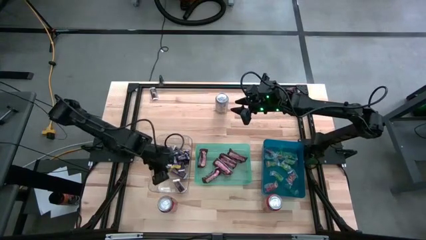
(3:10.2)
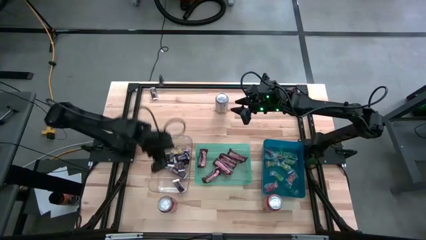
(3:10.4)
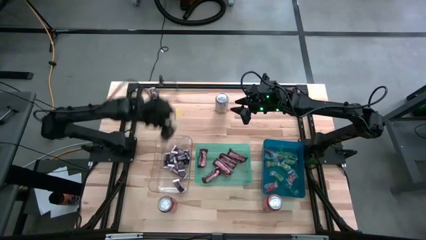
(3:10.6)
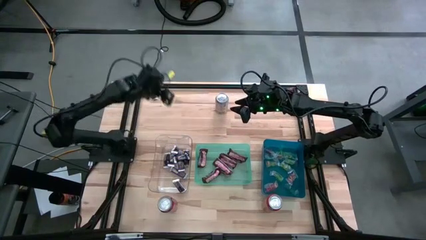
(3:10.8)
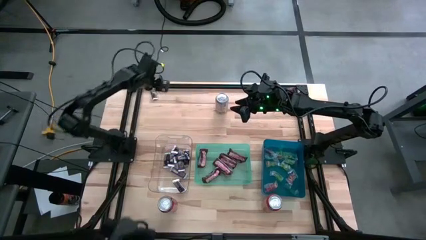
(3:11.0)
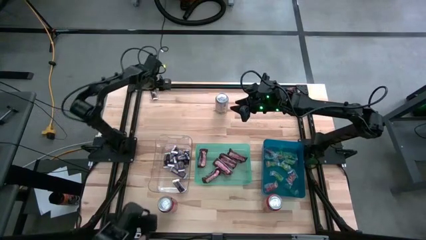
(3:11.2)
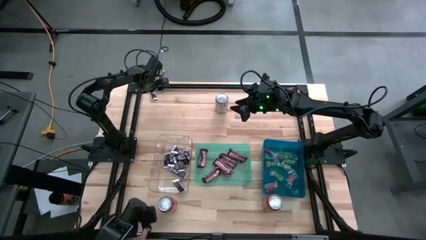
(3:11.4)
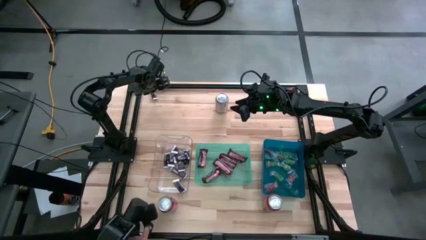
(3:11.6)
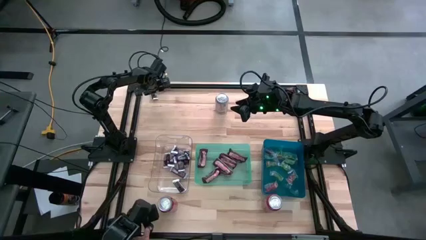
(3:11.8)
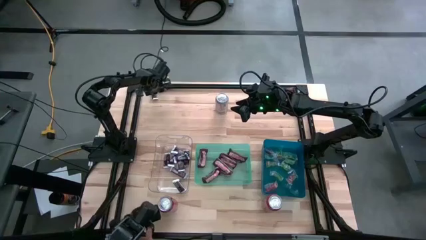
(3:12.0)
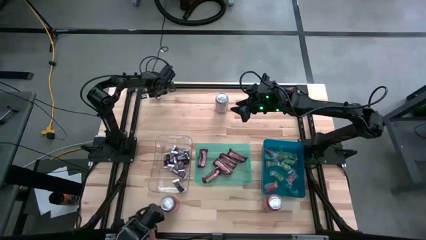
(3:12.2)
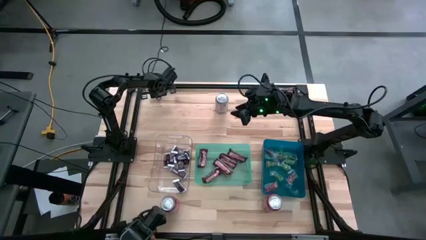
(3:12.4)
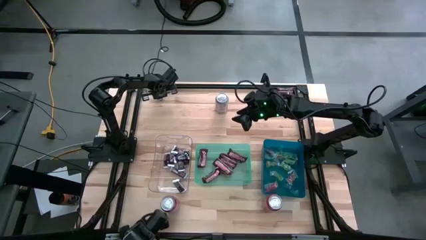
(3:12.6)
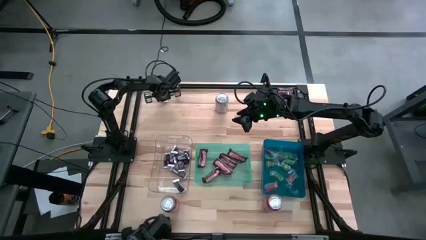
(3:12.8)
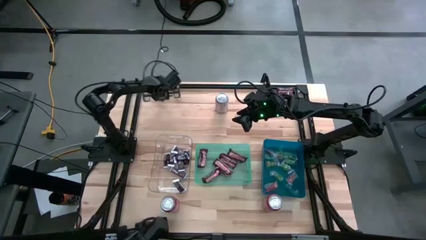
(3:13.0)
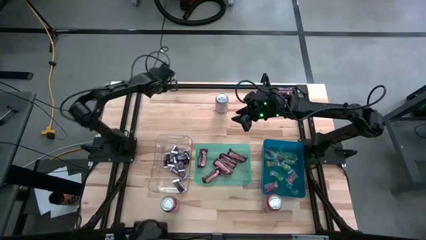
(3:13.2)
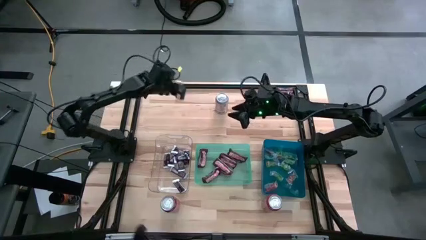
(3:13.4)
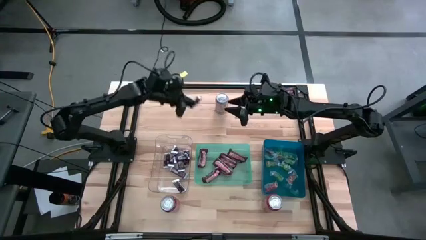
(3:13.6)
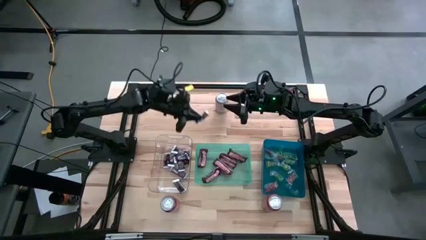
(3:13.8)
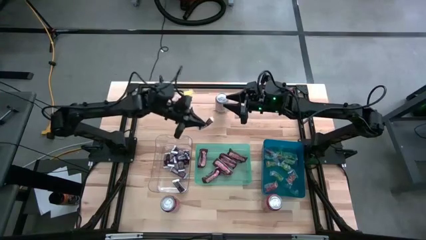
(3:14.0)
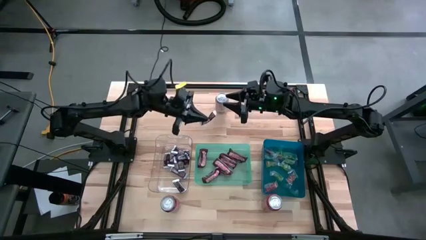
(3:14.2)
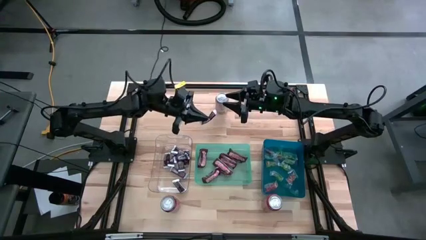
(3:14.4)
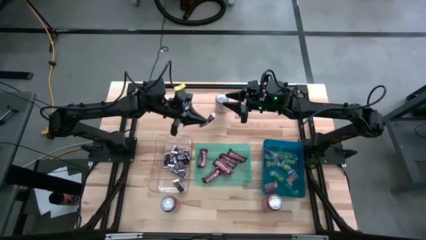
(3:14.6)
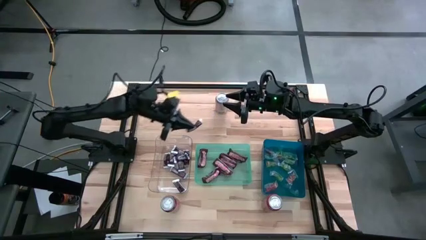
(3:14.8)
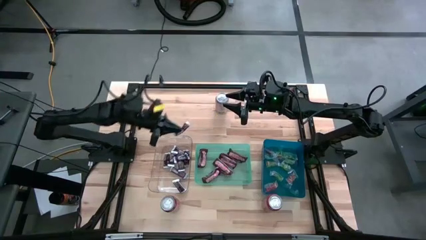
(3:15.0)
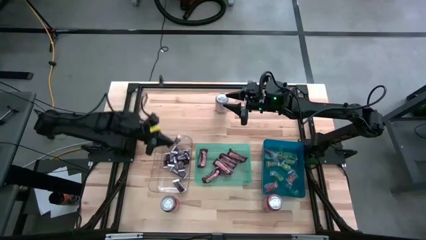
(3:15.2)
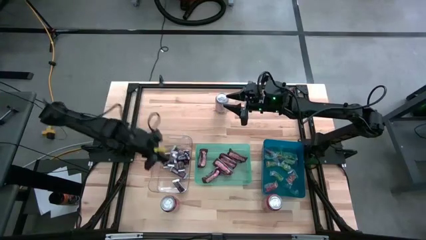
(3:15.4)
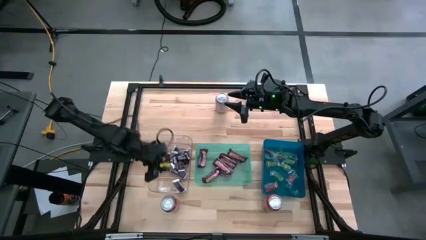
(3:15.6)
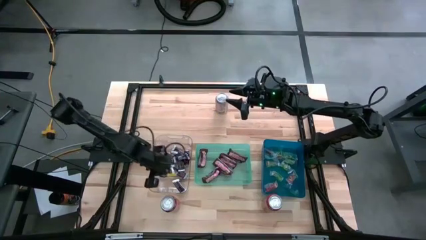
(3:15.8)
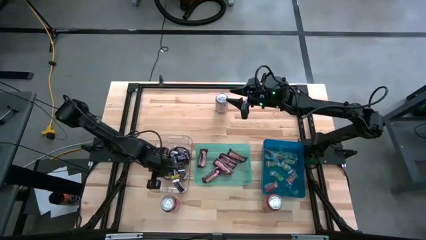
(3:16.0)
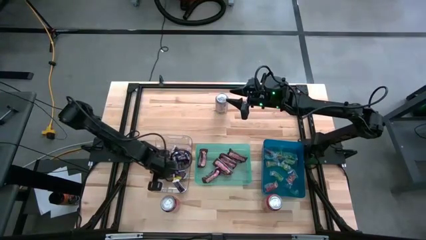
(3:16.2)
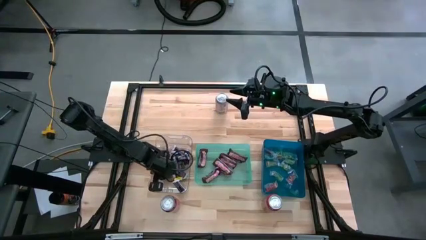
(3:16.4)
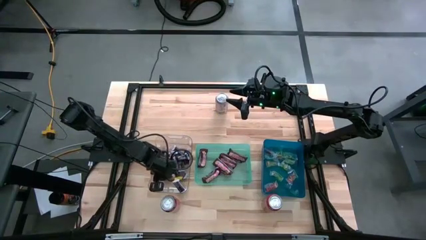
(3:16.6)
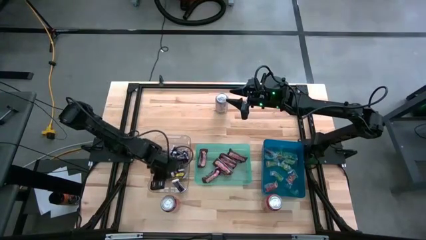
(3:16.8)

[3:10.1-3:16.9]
Task: Organize candy in baskets
Put the brown white chocolate bar into the transparent bin

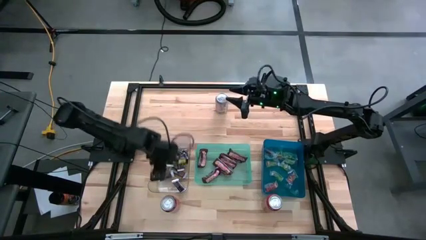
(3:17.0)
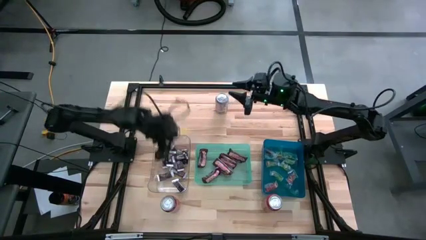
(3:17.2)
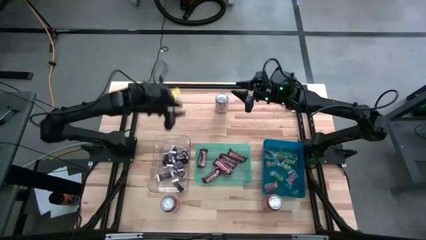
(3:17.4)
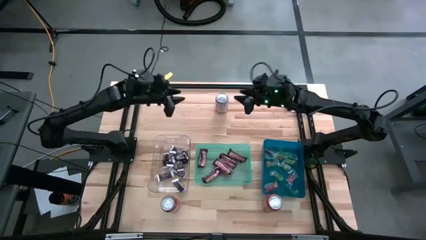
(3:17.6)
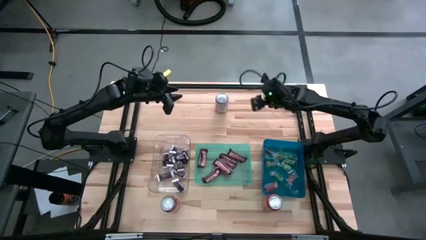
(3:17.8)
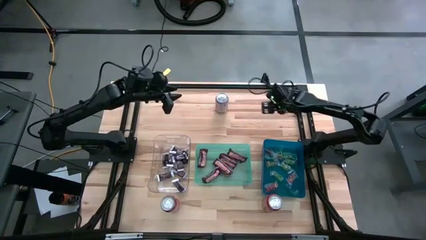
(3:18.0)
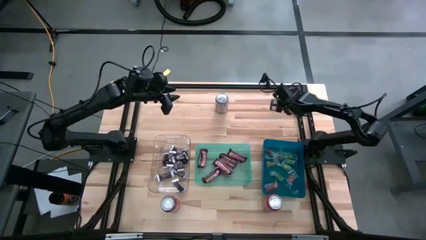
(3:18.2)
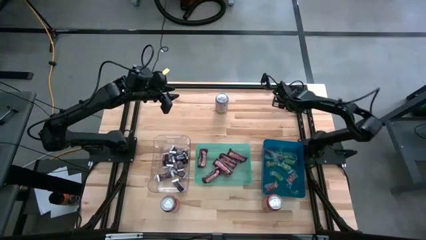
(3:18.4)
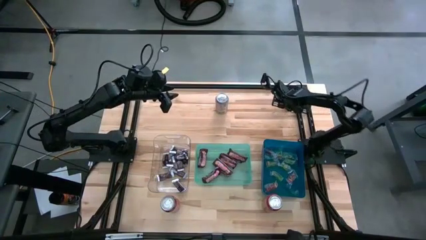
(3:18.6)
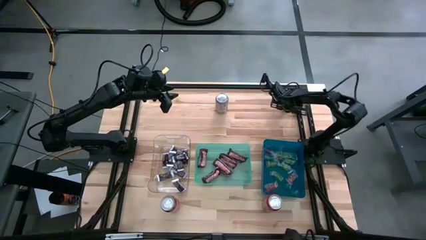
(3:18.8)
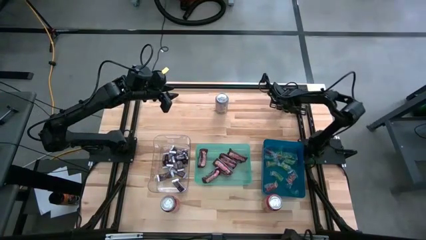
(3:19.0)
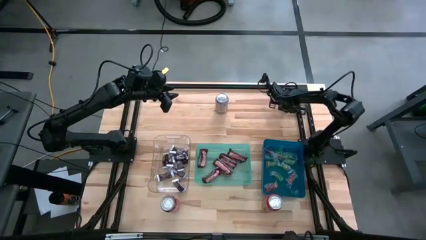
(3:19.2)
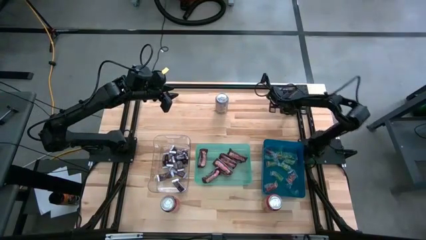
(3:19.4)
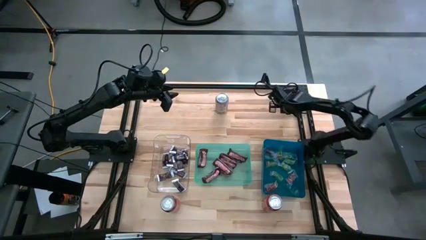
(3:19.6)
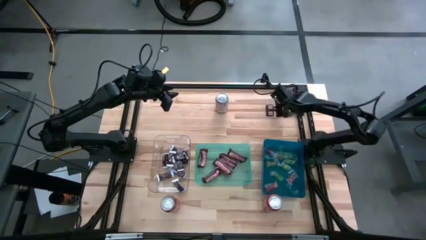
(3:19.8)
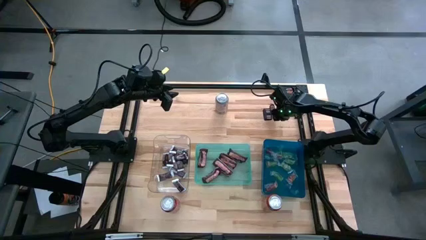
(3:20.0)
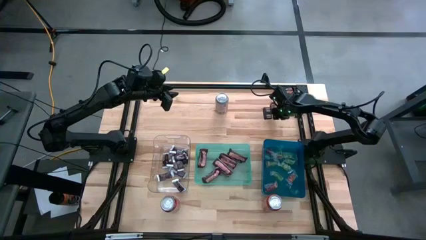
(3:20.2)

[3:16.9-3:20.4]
Put the brown chocolate bar into the green bin

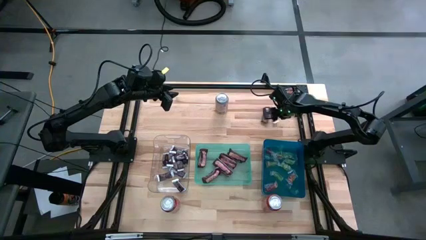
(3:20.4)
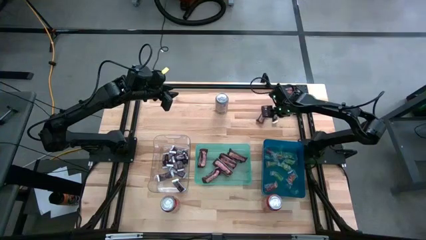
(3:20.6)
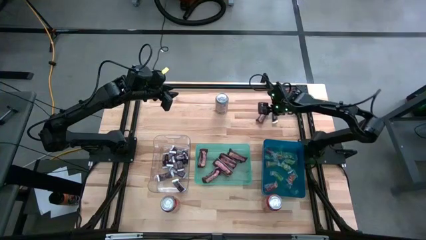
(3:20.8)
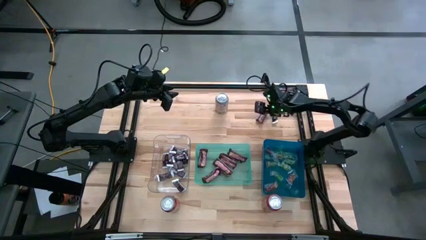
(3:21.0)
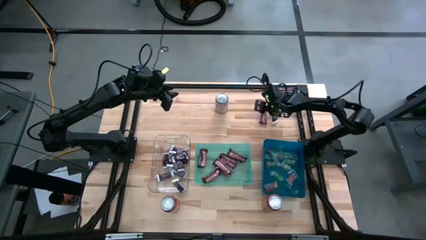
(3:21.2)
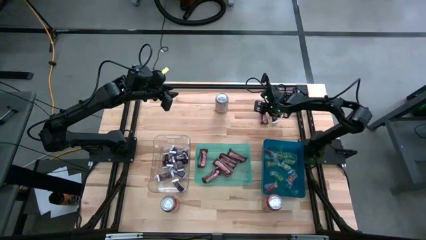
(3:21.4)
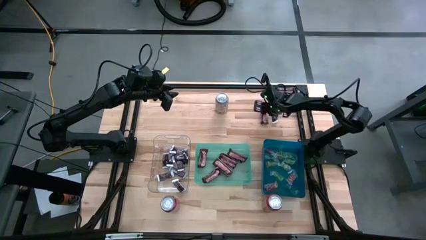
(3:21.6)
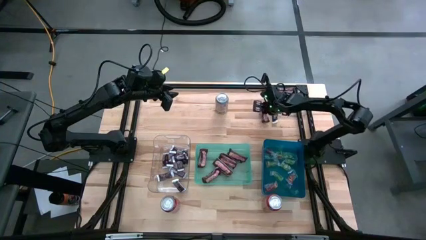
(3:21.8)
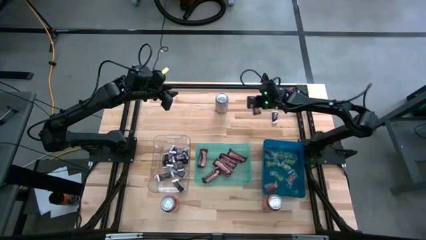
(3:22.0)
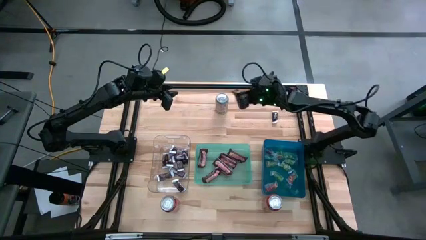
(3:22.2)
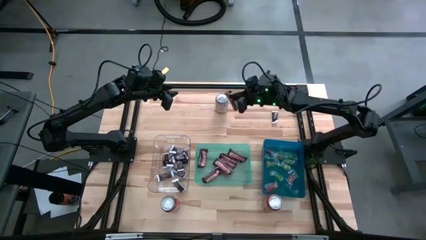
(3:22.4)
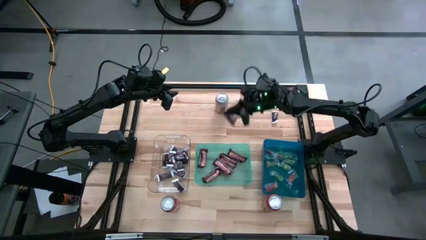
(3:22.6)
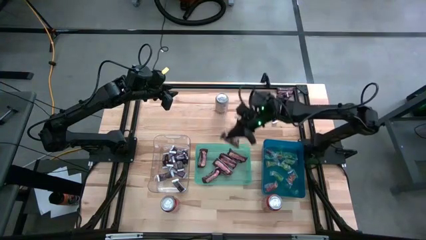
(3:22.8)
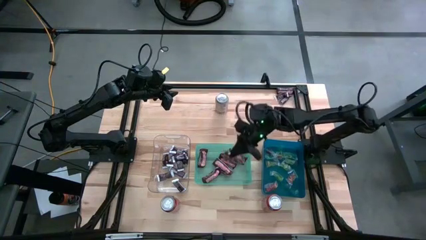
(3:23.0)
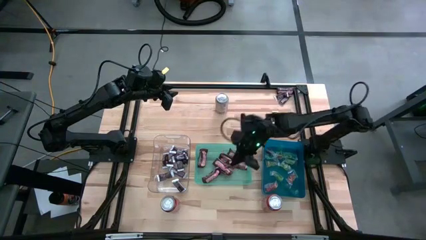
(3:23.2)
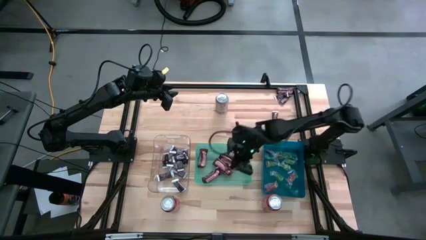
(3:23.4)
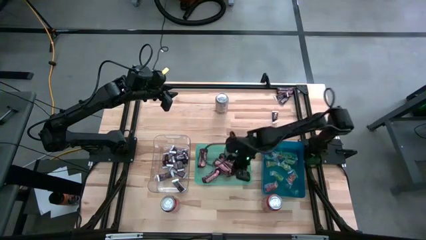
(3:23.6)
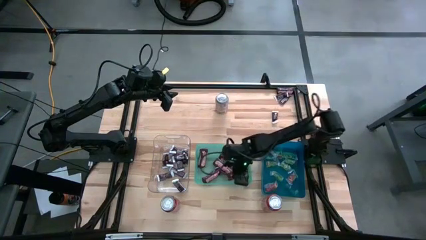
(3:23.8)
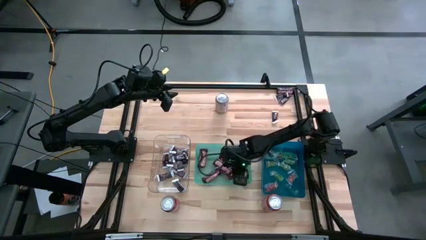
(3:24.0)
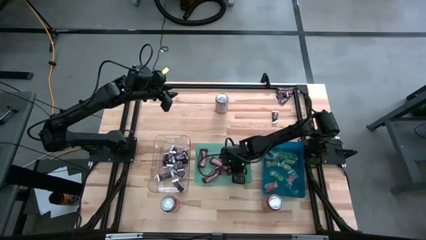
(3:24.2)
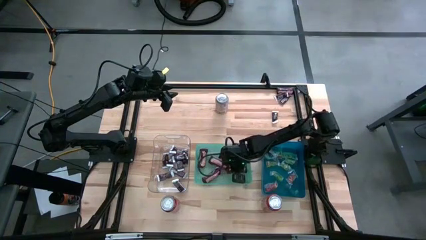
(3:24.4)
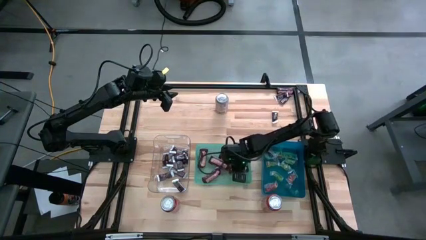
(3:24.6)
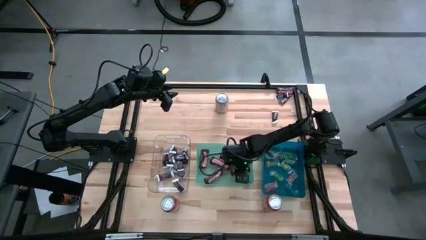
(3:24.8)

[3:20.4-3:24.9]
Put the brown chocolate bar into the green bin
